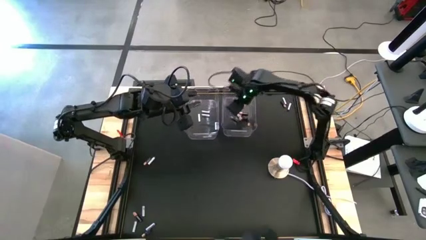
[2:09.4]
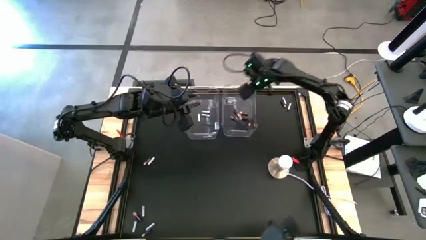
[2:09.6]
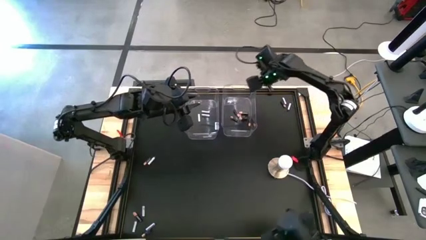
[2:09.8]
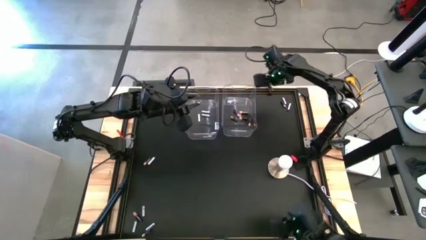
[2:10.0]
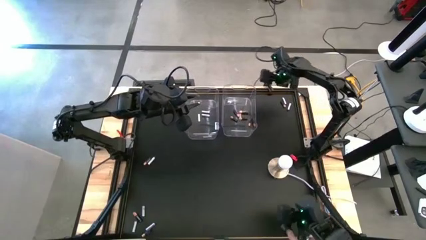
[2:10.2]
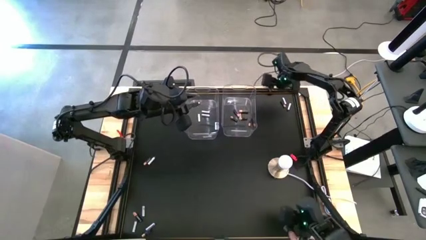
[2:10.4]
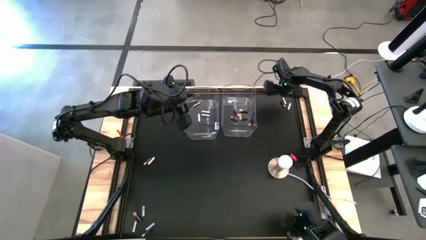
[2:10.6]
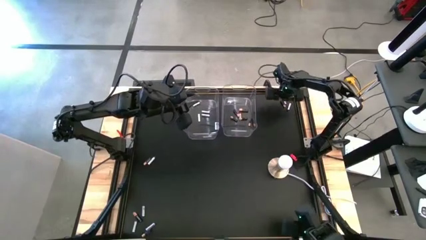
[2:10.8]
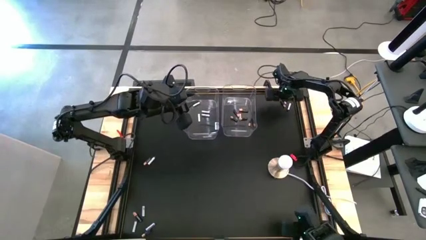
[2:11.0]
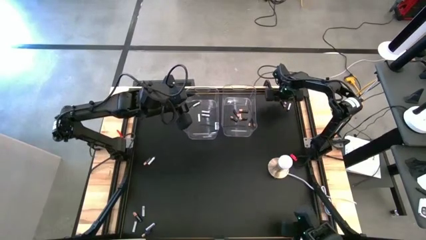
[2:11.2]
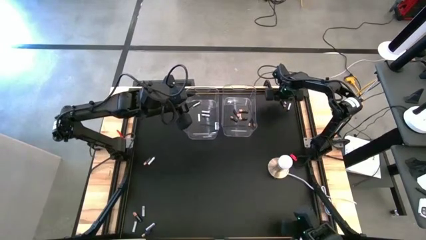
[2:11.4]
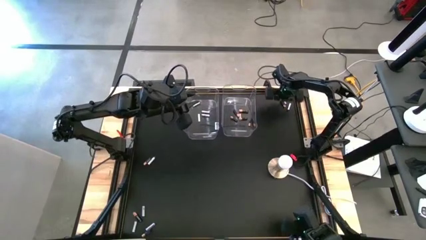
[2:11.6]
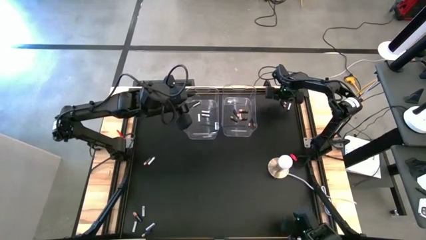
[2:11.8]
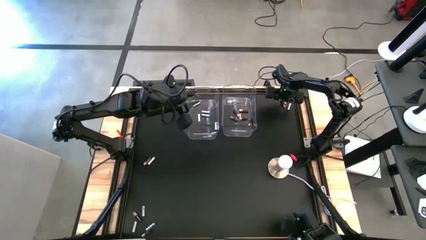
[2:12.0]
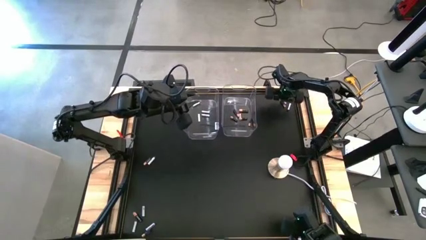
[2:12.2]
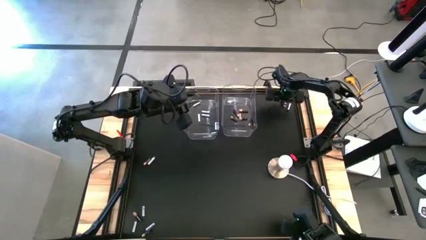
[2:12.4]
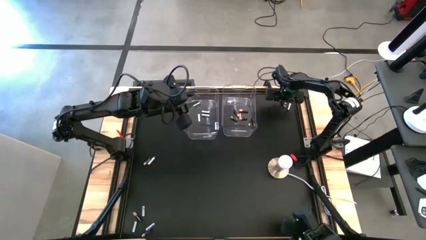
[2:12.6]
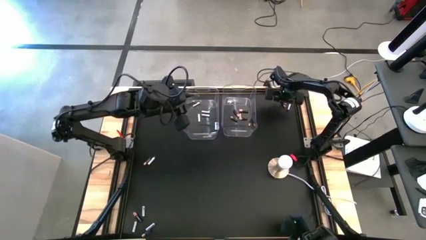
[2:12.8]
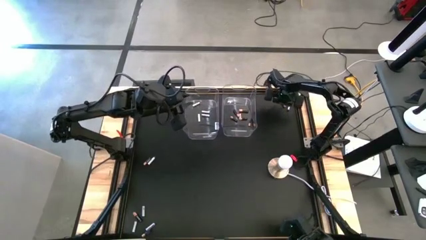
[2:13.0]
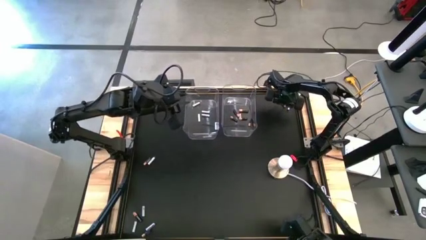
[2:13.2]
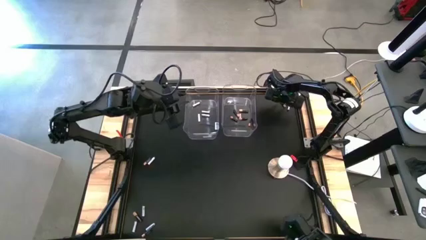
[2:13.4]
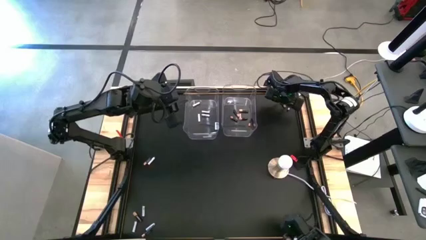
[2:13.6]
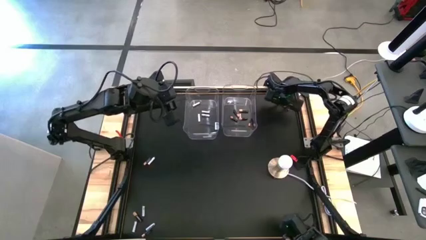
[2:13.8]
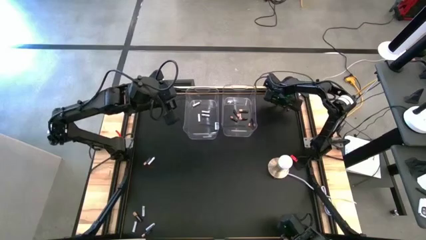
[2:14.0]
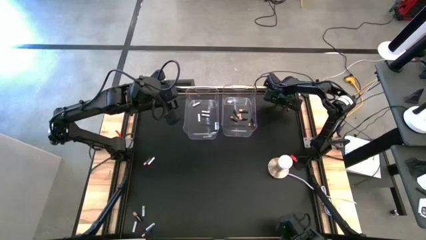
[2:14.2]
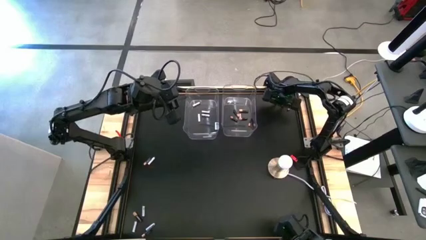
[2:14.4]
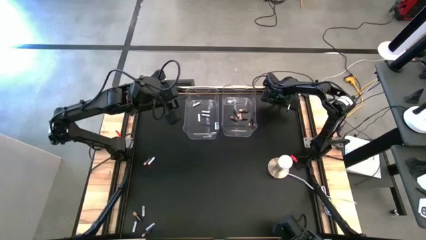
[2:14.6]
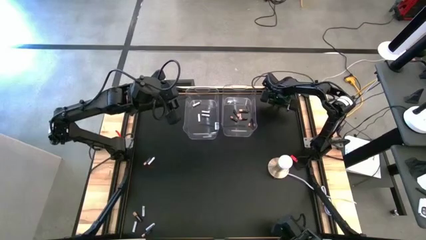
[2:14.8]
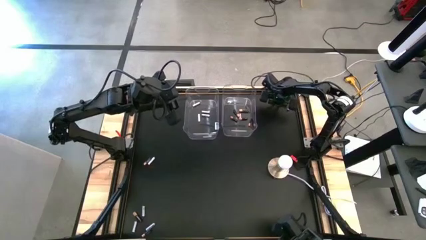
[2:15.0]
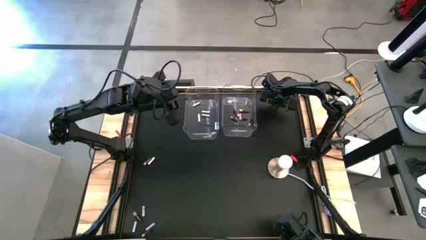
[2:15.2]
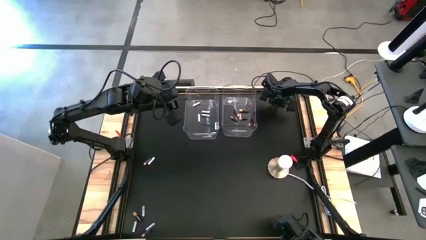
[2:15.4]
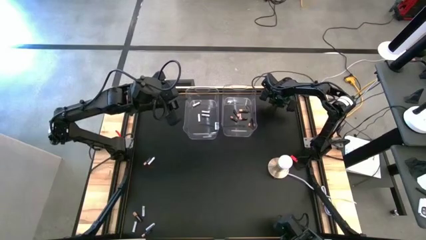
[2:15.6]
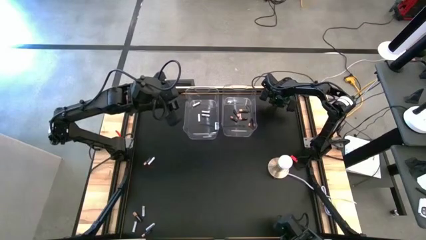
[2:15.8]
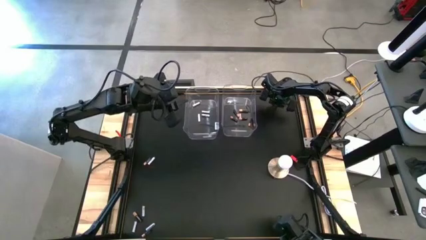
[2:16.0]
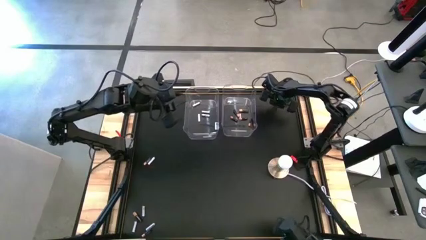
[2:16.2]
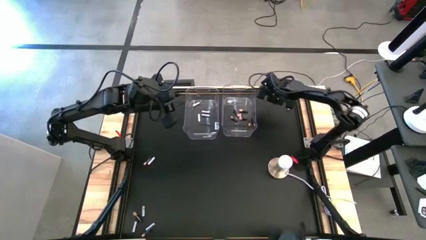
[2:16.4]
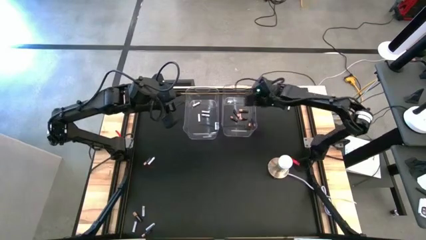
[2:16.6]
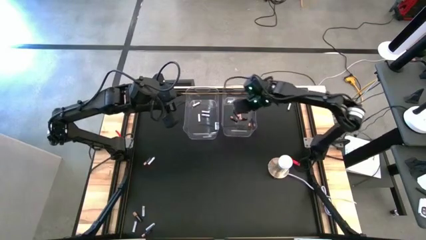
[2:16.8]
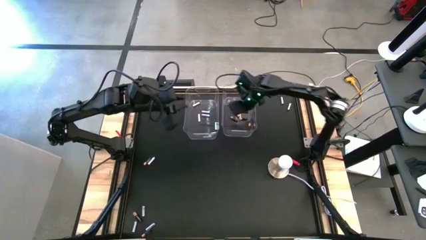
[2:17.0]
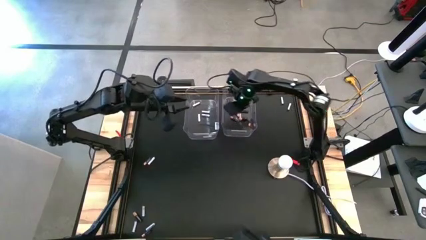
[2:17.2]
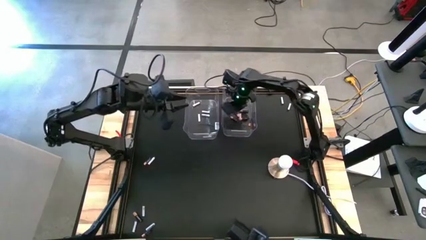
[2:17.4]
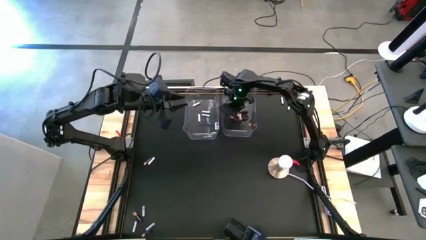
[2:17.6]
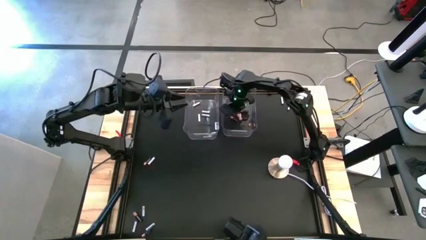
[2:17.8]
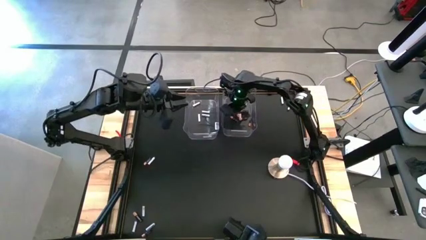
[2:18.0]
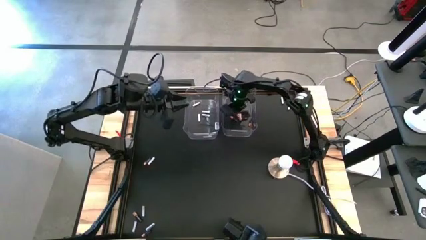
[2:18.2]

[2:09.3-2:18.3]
Task: Sort batteries
Put the black battery into the right transparent bin

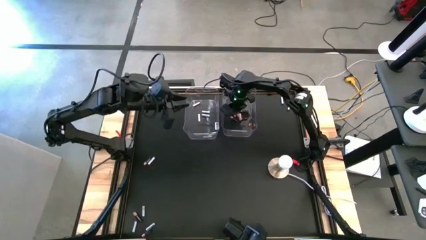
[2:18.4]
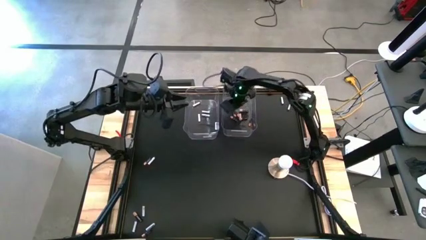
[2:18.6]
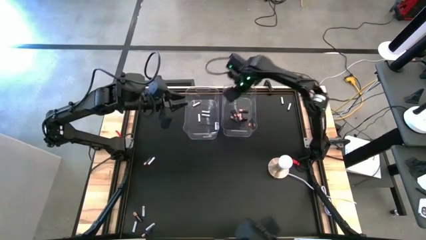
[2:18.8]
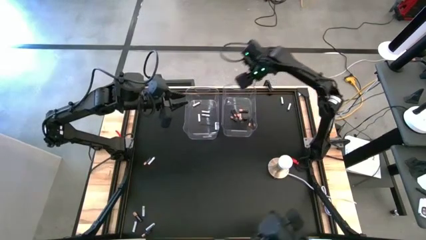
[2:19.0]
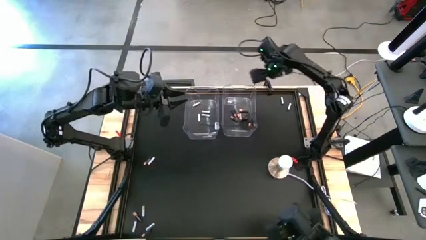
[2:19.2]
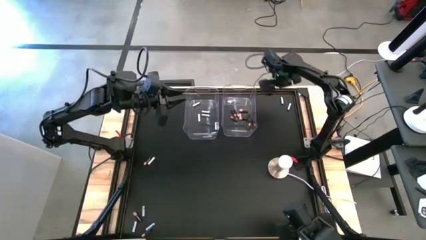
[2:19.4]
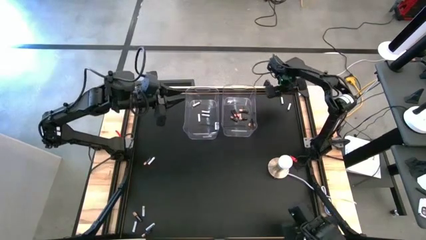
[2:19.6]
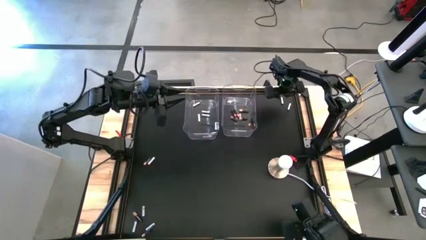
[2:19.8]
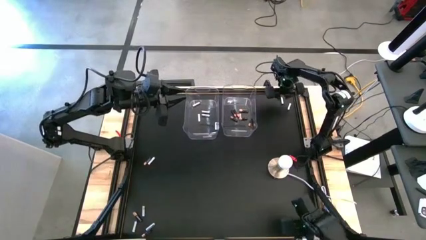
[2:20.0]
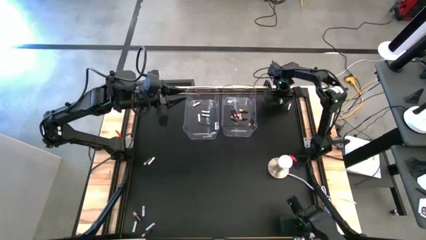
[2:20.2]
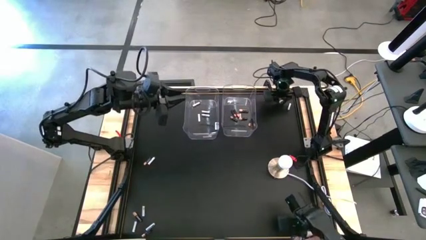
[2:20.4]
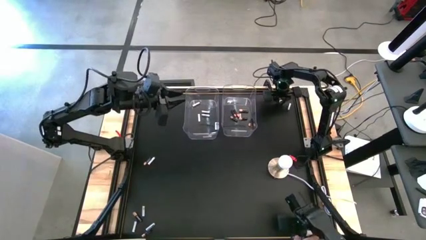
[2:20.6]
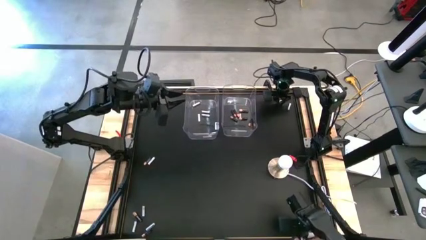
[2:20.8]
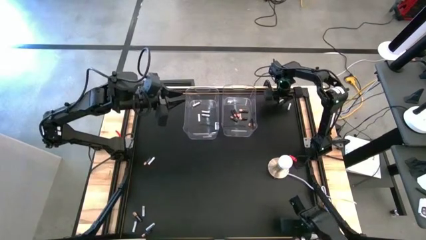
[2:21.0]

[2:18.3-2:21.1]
Put the white battery into the left transparent bin

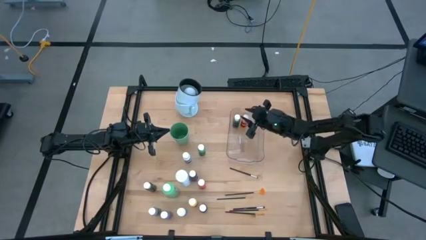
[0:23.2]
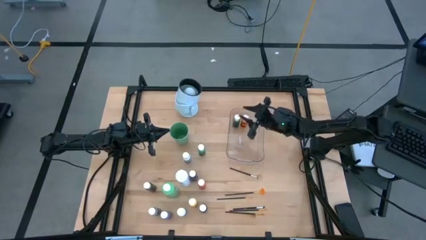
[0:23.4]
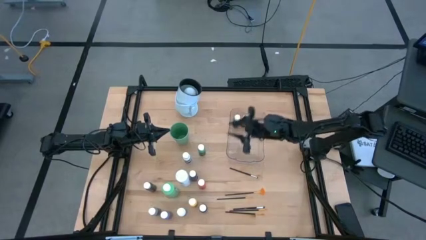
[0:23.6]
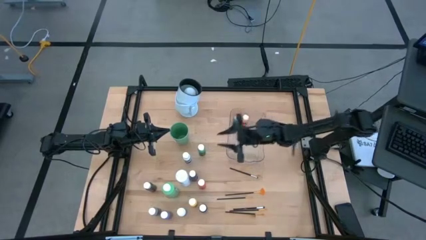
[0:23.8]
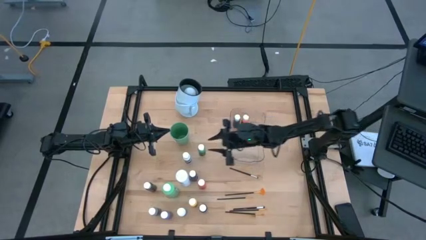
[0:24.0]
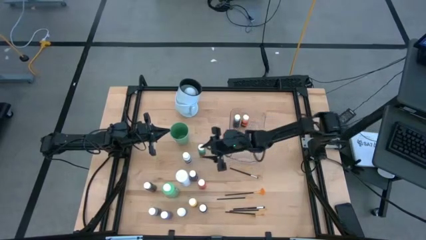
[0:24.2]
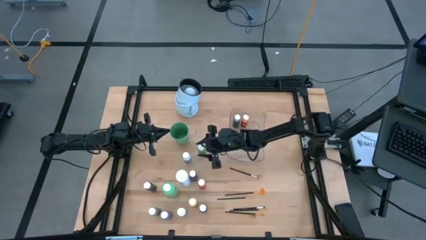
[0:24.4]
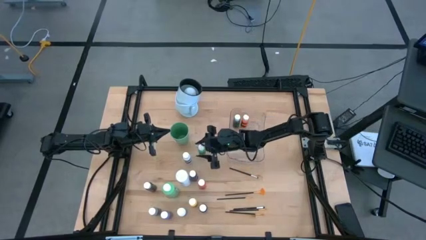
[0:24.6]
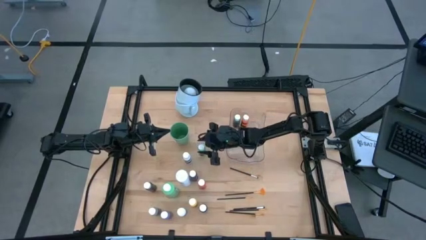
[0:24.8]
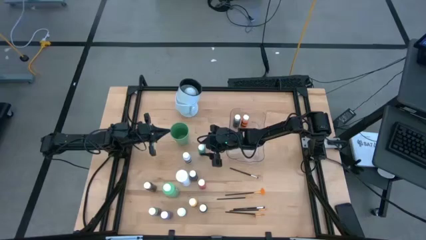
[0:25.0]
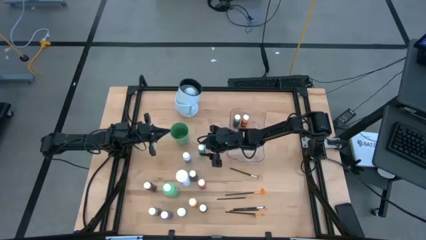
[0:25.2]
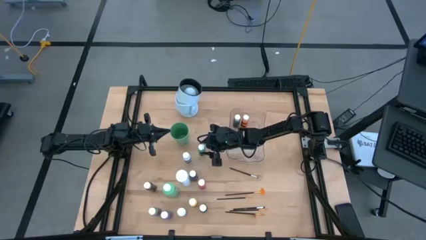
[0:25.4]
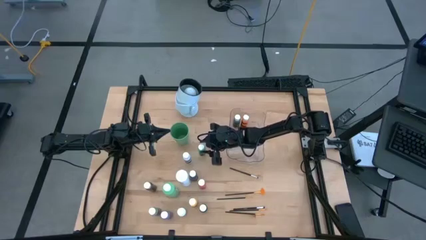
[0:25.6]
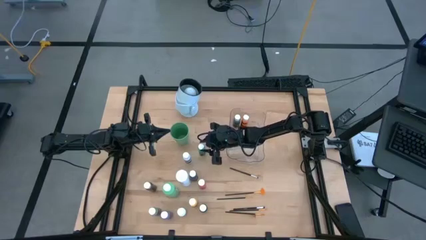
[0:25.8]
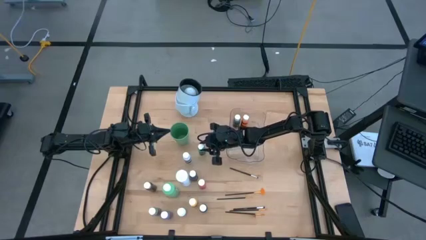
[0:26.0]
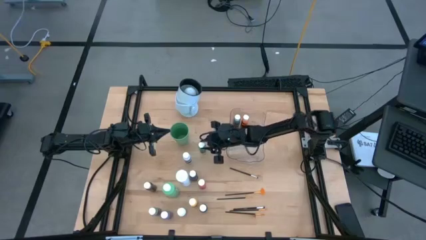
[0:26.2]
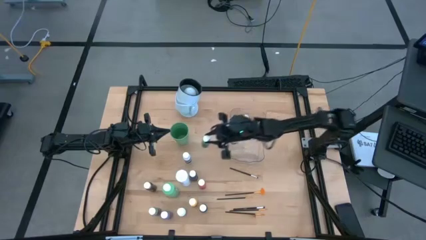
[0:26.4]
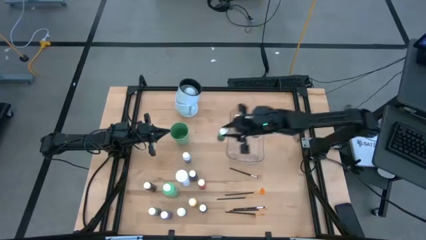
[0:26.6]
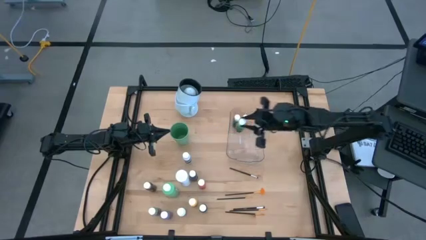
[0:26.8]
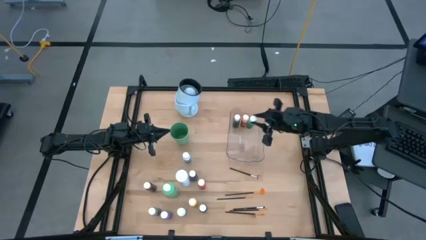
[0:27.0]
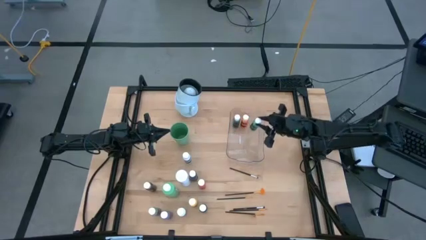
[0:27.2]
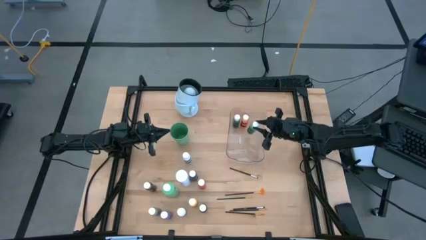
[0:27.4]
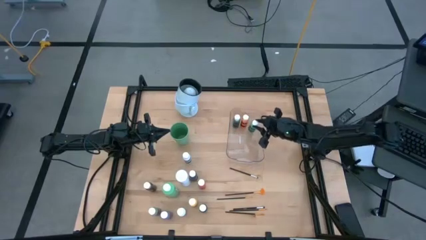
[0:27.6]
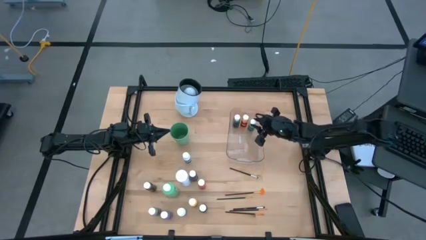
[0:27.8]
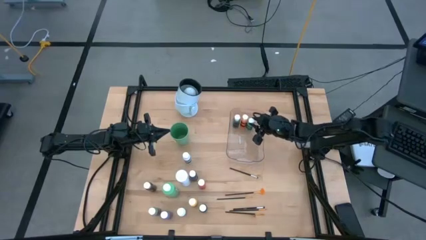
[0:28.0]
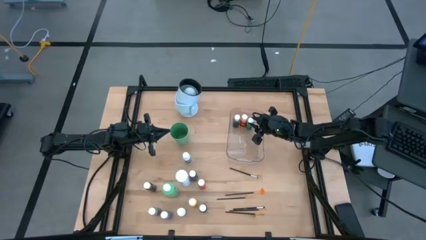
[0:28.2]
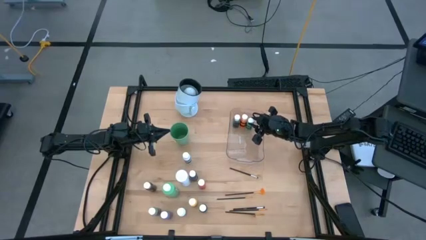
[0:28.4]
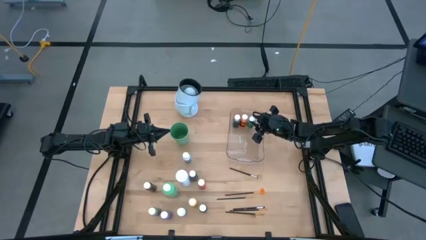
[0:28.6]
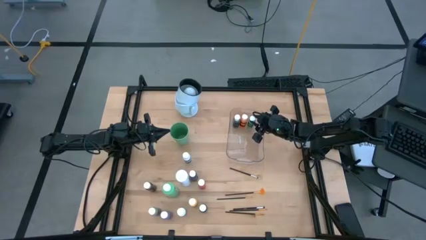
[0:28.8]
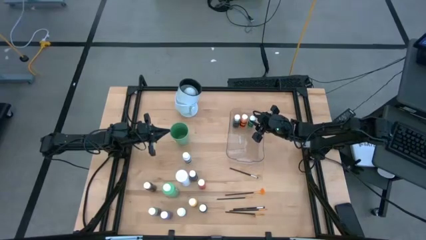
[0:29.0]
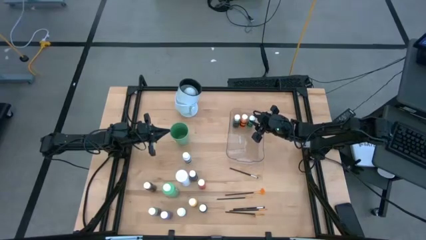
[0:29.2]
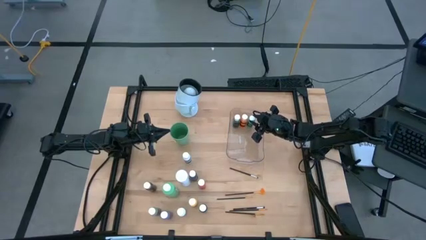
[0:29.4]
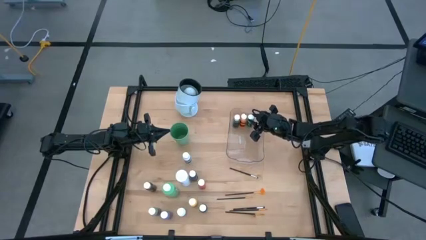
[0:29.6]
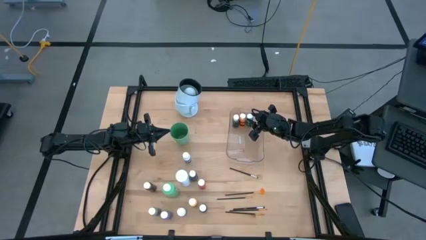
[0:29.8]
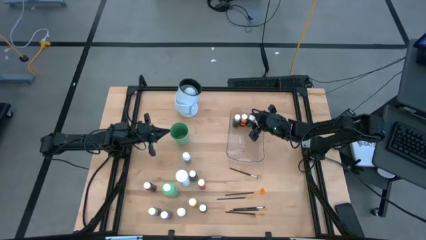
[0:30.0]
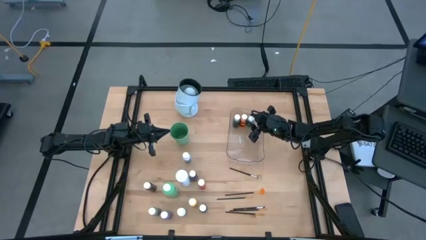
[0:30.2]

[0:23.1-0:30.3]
Task: Pick & Place Paint Supplies
Put the green paint bottle into the transparent bin
